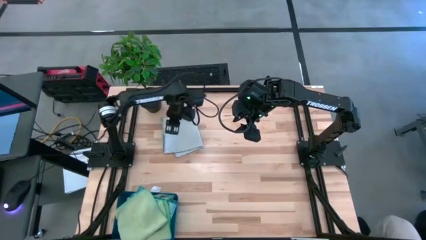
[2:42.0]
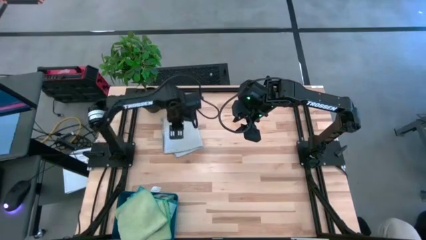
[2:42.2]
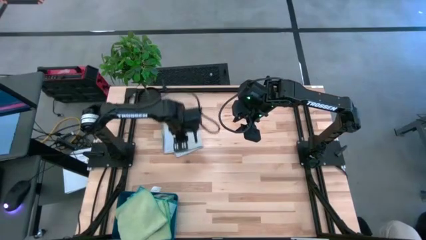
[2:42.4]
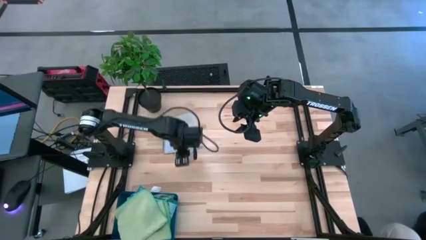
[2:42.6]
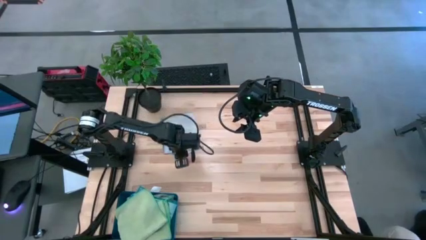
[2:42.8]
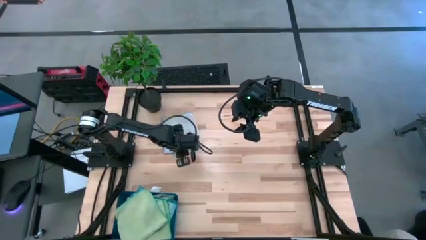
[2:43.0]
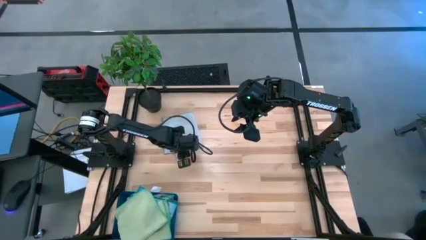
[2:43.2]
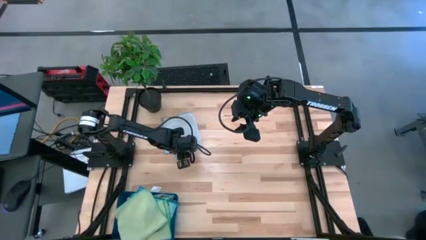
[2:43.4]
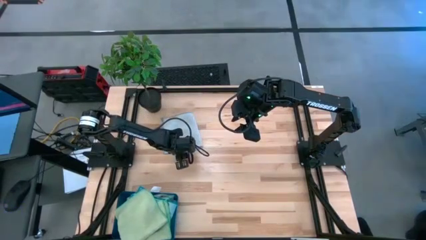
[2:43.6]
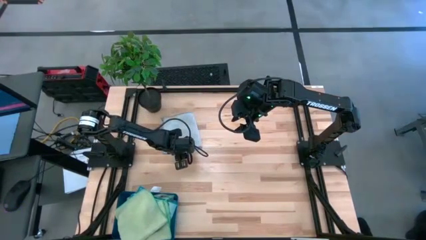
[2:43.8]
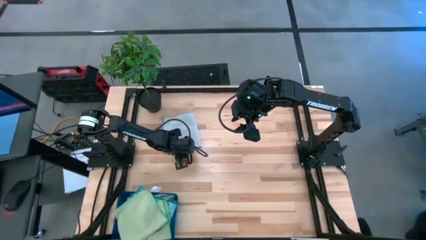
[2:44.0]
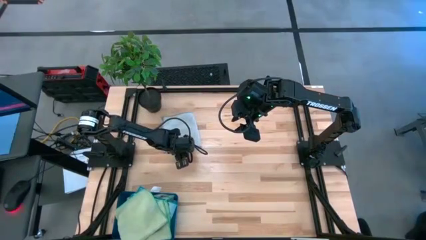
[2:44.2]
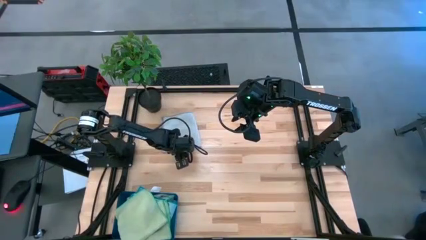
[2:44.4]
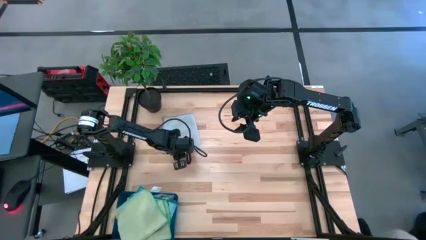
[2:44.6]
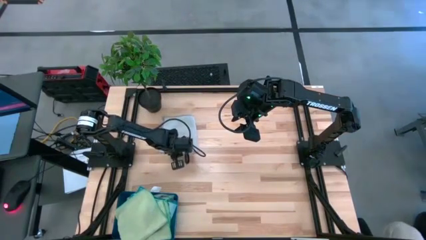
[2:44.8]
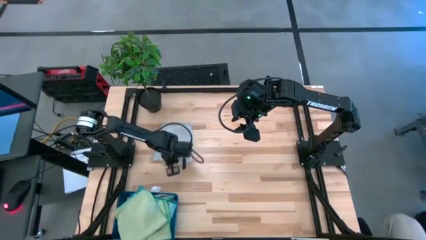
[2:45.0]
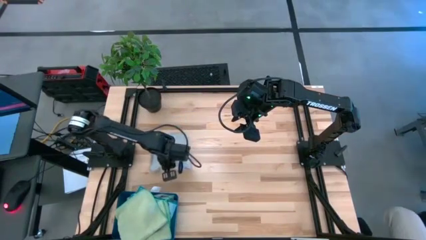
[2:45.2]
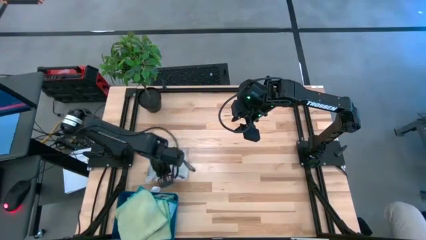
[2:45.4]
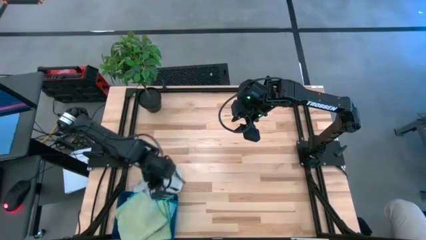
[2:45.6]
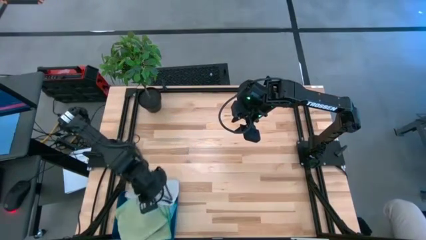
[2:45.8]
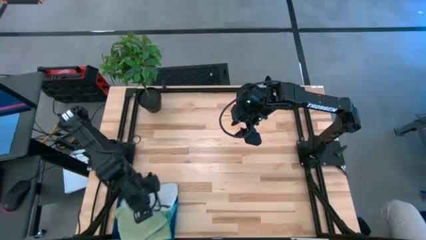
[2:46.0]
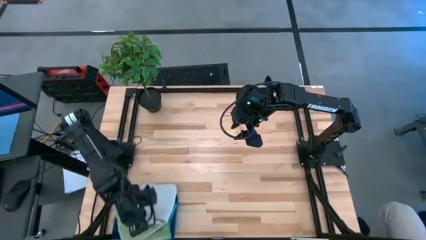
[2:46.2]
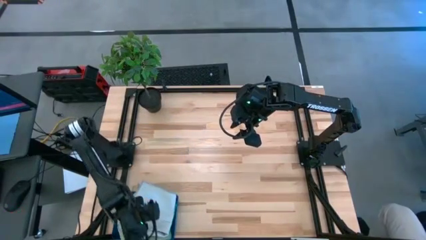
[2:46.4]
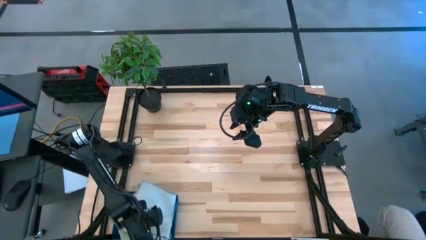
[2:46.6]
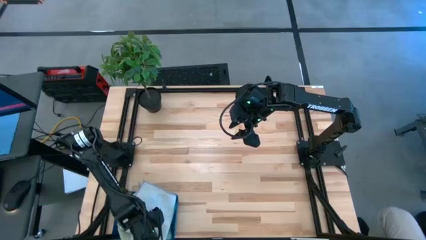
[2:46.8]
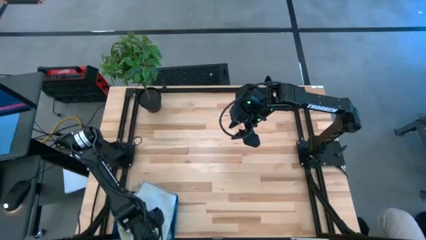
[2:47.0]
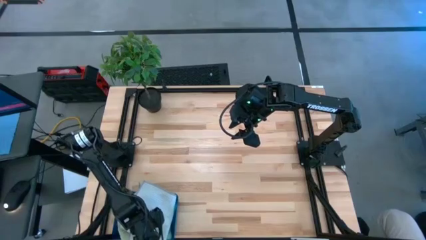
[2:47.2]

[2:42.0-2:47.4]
Task: Fold microfiber towels
Put the gray microfiber towel into the blue bin

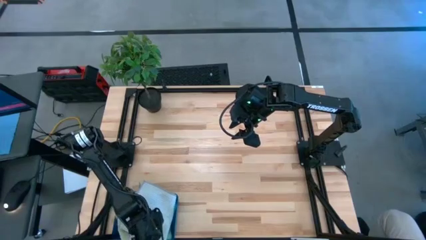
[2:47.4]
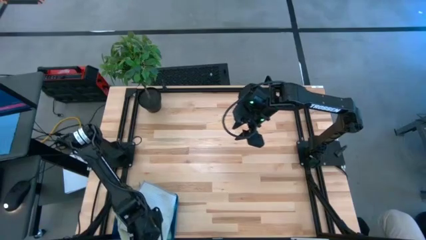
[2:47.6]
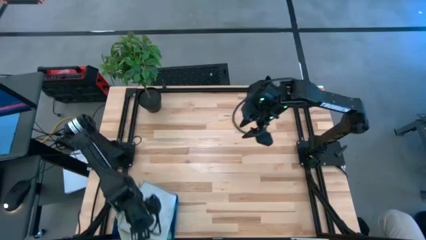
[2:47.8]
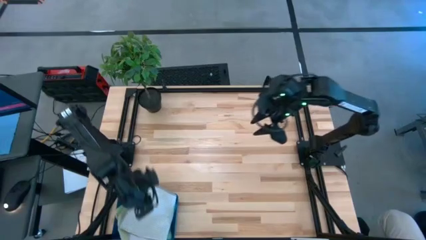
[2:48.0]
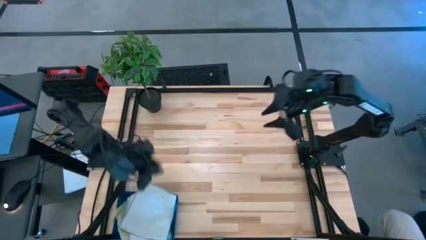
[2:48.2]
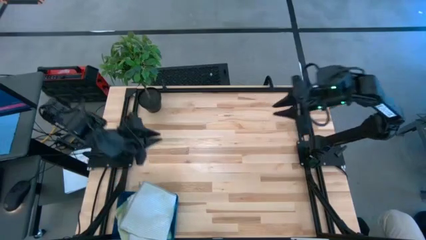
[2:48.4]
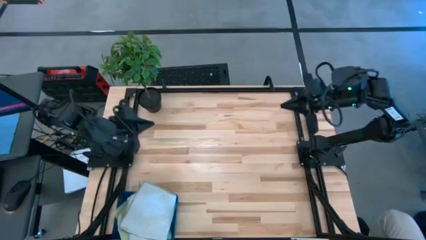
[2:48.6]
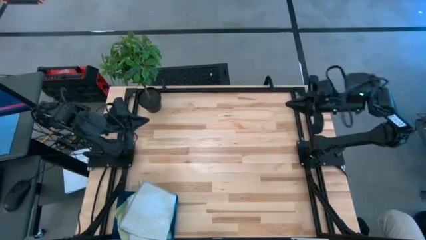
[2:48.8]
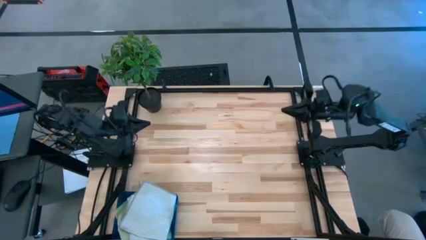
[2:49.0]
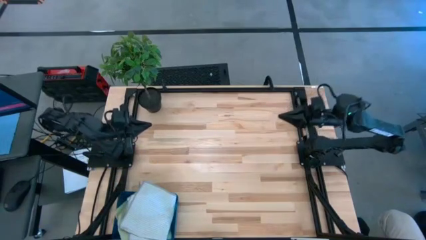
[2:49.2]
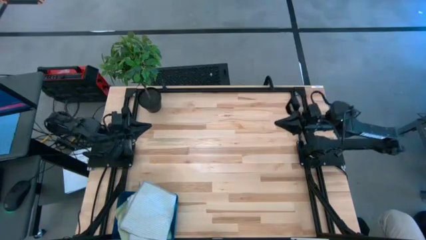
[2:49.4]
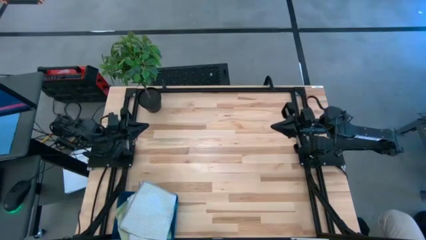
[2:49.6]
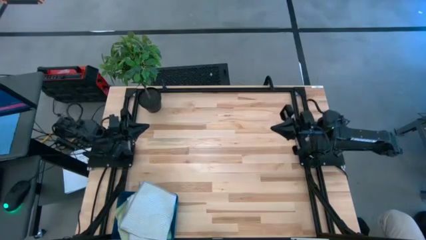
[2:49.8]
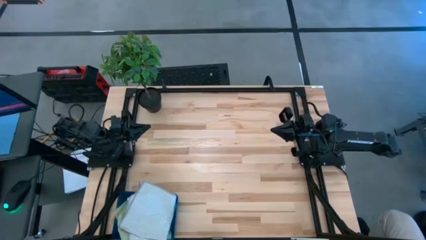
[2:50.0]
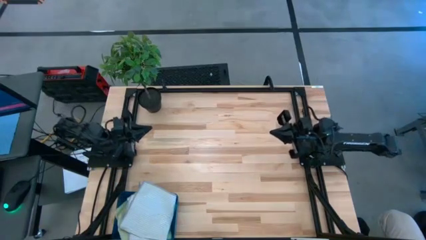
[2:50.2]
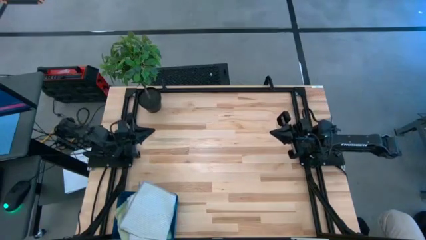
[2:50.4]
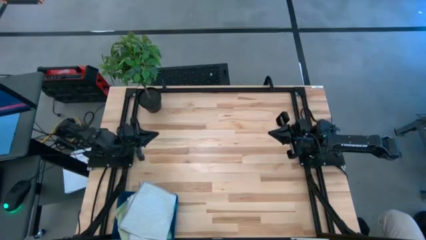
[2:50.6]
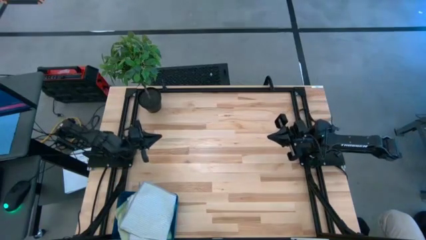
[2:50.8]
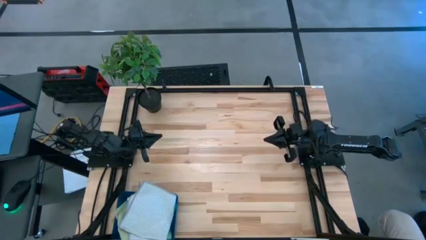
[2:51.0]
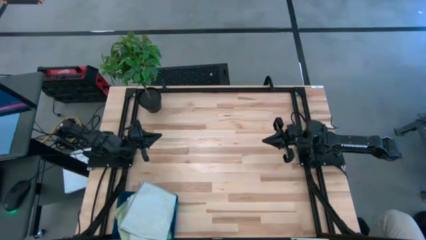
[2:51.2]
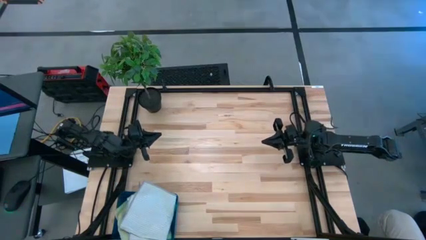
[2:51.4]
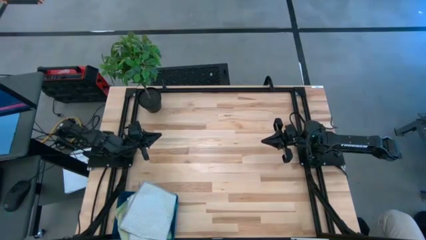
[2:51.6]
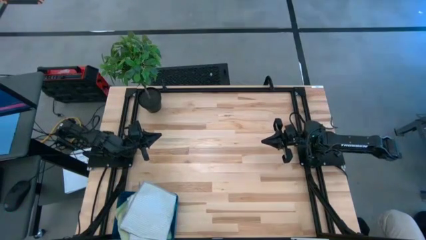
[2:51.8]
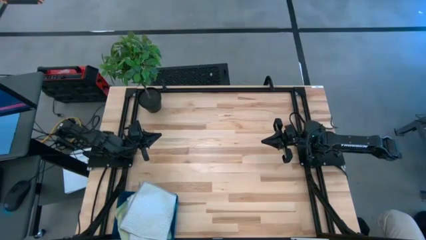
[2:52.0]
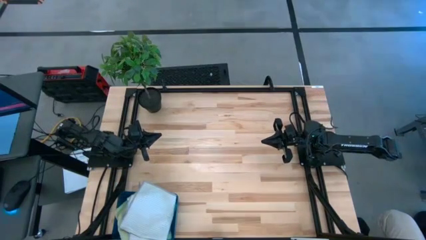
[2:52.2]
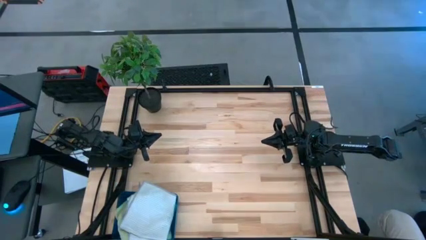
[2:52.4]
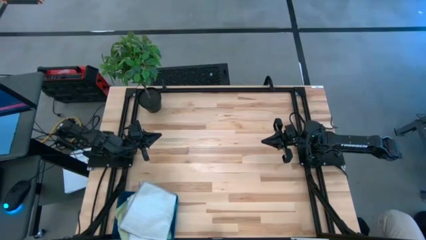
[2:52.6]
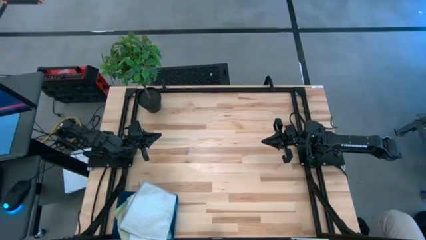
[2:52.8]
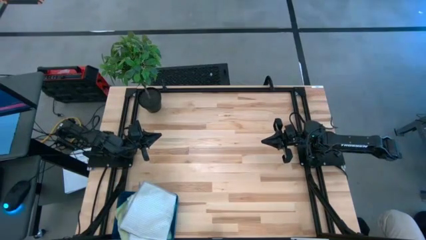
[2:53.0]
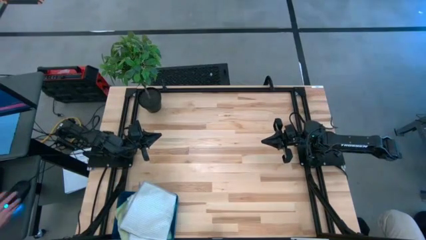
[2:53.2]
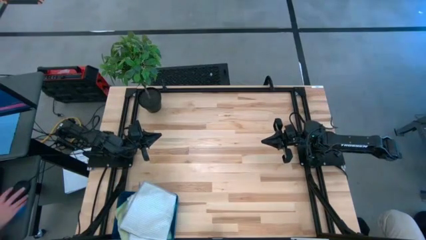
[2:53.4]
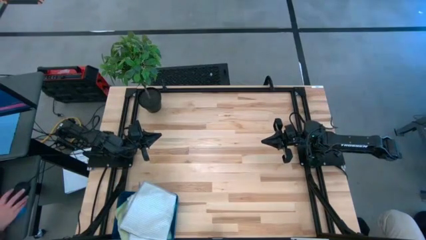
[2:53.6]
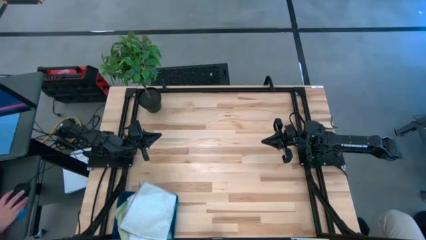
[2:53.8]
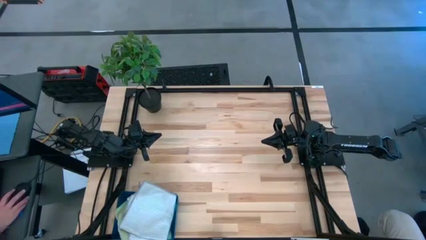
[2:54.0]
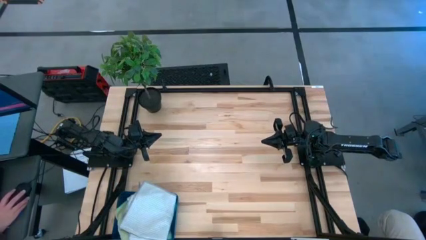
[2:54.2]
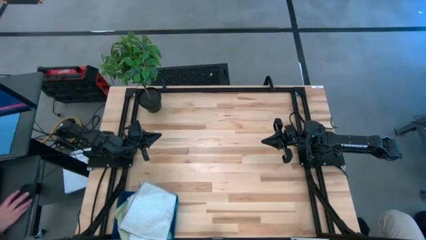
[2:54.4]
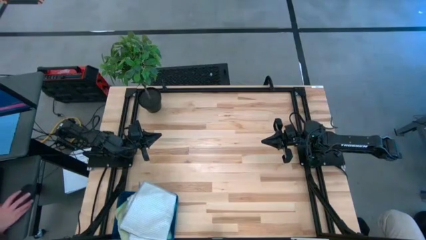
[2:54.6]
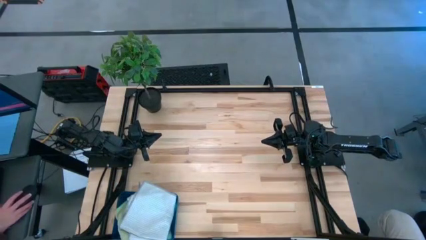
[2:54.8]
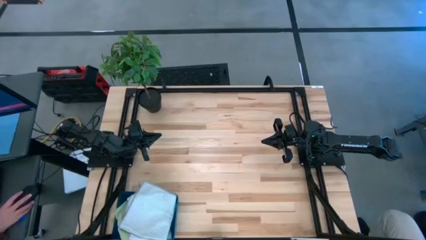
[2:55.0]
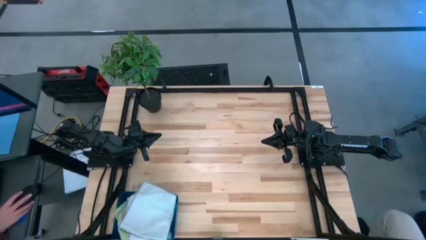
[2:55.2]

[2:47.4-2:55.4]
Return to Home Position

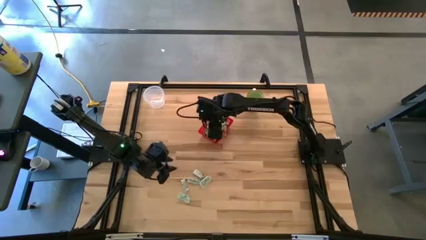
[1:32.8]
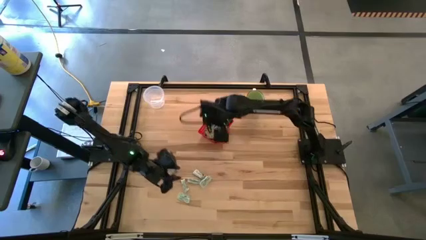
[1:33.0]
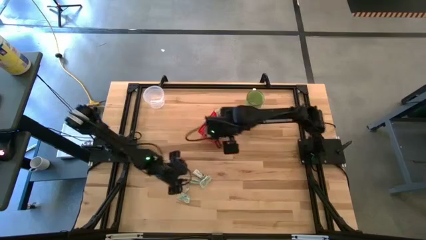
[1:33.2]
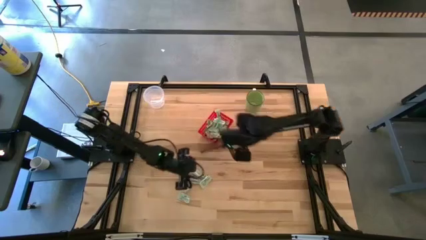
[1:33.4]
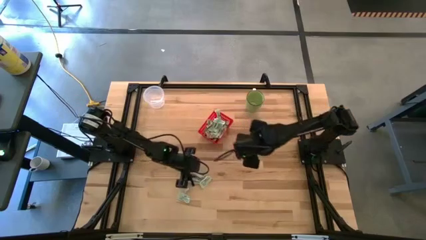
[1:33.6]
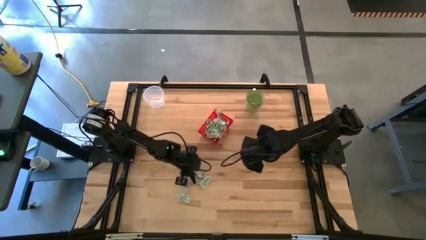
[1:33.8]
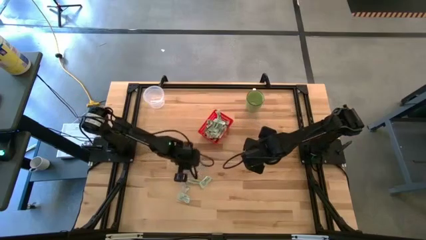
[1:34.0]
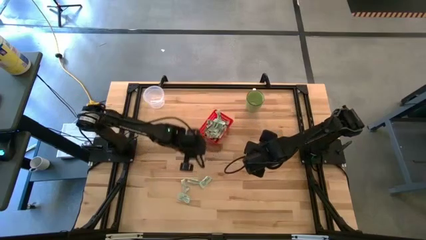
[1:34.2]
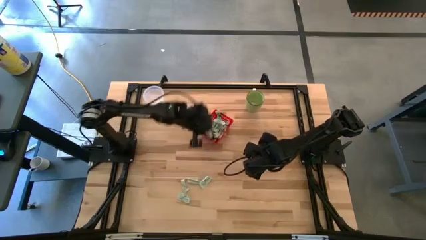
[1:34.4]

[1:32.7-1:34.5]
Task: Pick and place Stevia / Truvia into bins
Put the truvia packet into the red basket

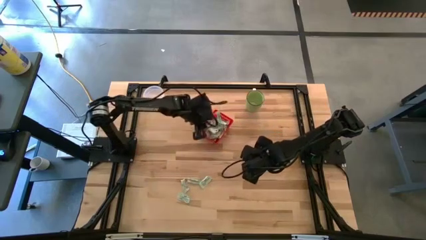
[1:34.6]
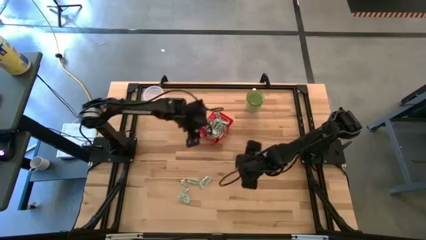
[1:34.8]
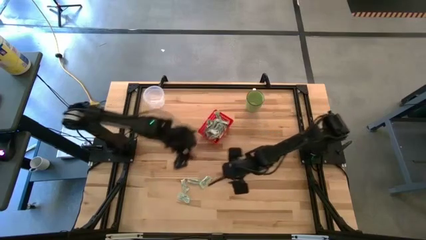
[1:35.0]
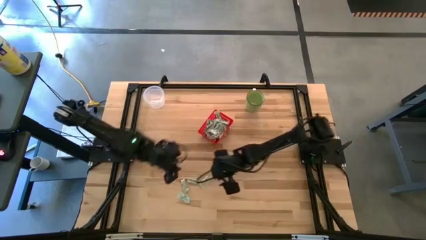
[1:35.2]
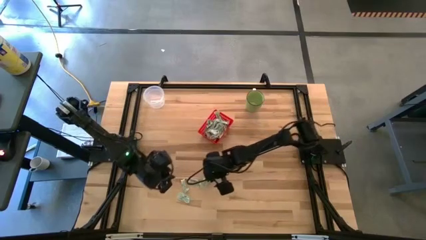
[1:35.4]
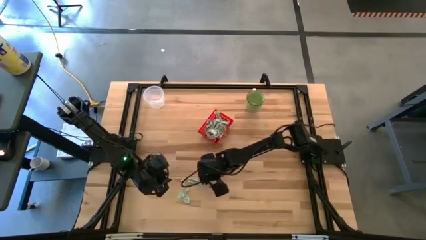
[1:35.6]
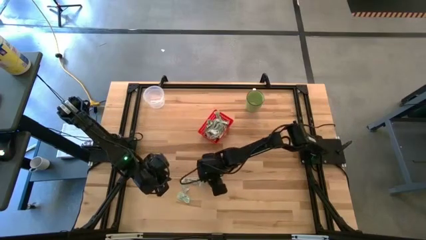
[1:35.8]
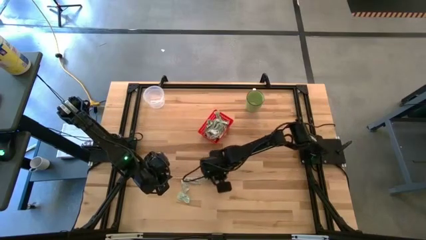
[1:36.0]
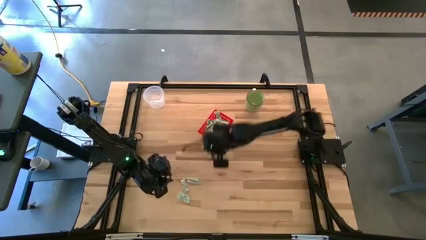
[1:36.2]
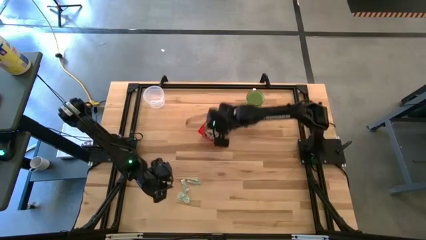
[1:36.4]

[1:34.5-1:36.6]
Put the stevia packet into the red basket

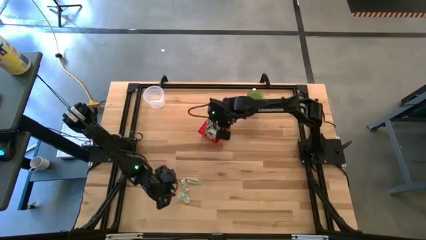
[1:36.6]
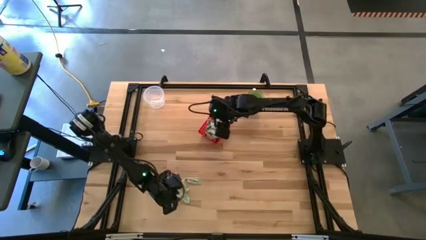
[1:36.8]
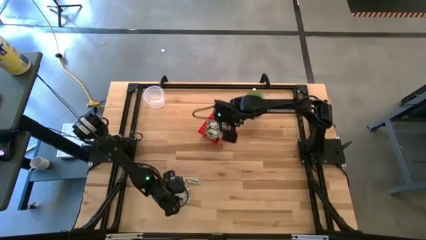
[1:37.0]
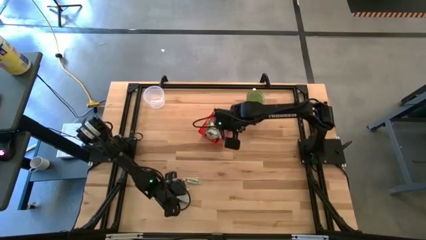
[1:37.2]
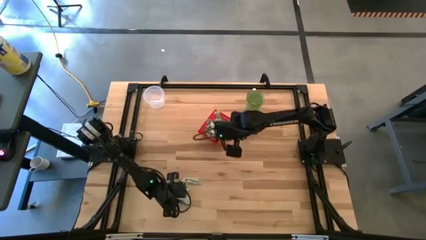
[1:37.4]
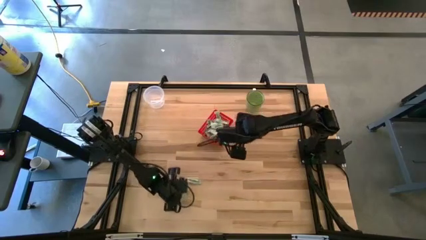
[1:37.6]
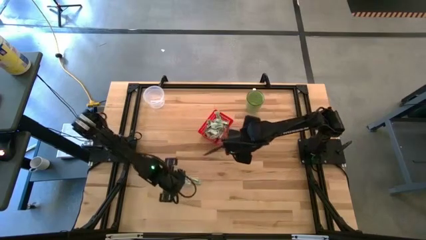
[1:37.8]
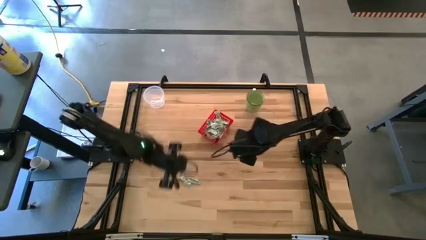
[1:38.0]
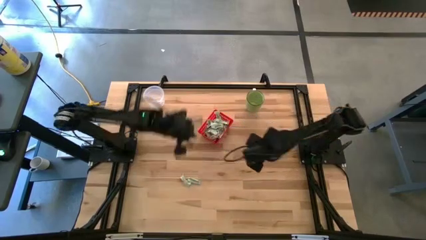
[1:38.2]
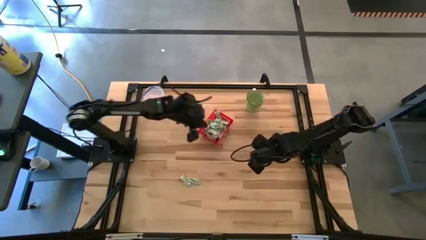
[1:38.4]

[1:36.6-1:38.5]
Put the stevia packet into the red basket
